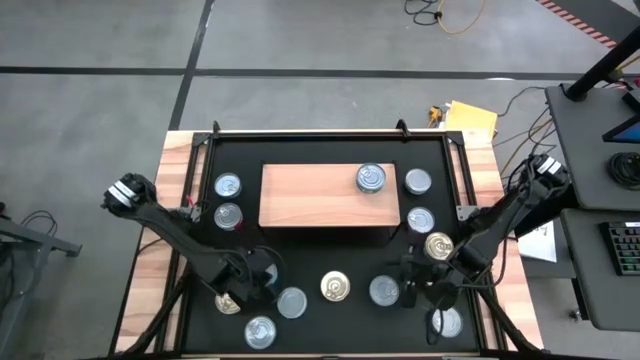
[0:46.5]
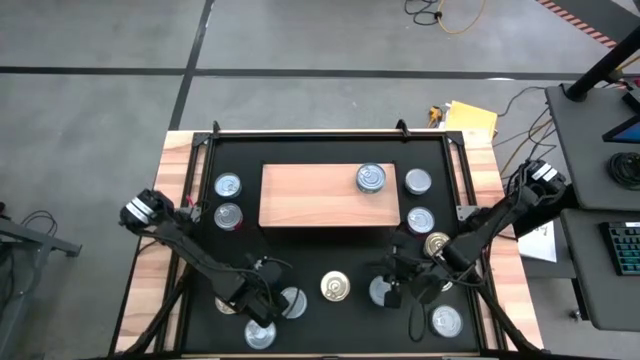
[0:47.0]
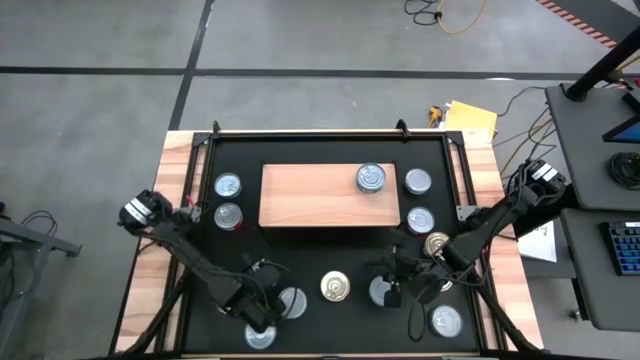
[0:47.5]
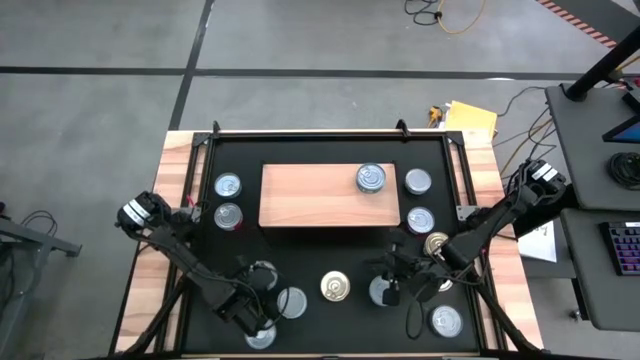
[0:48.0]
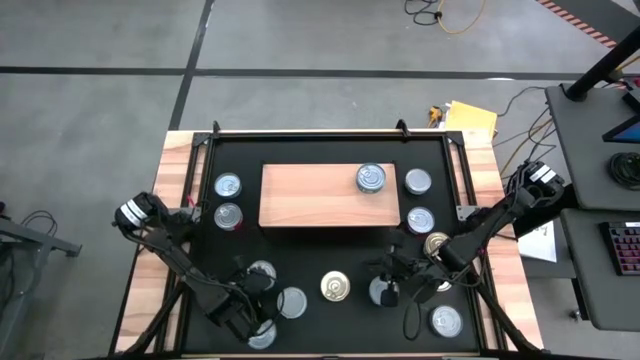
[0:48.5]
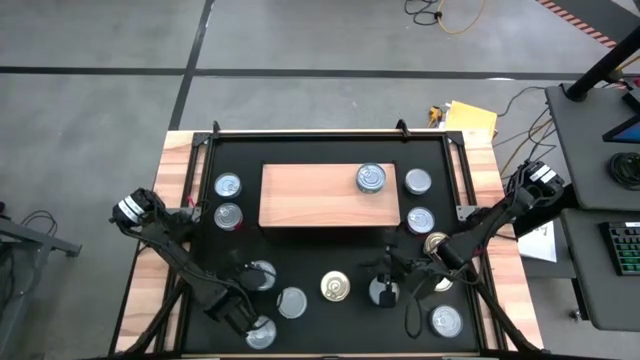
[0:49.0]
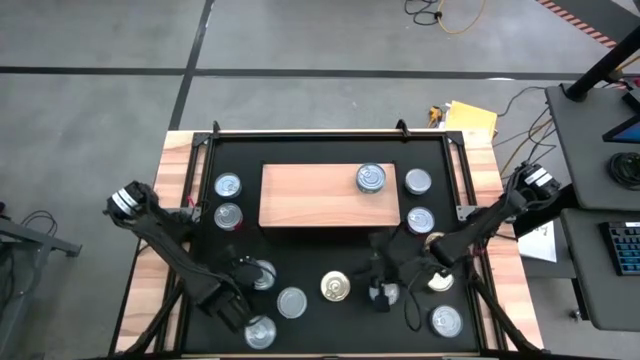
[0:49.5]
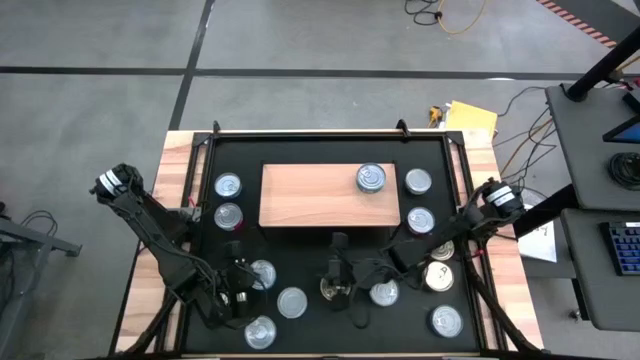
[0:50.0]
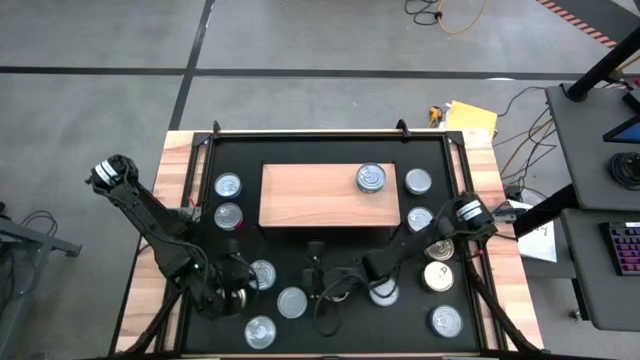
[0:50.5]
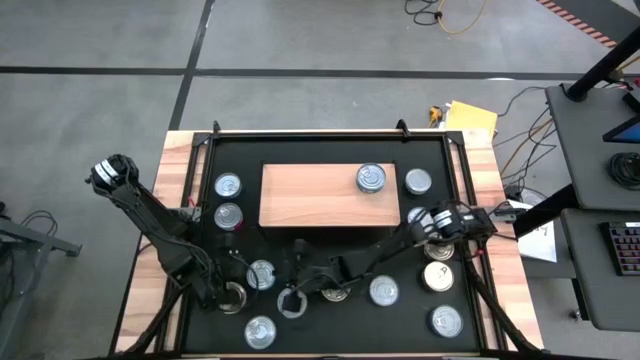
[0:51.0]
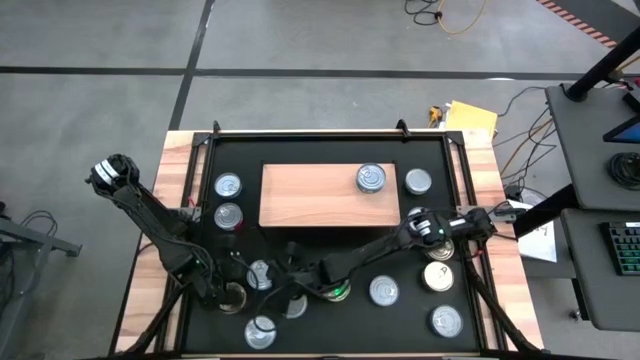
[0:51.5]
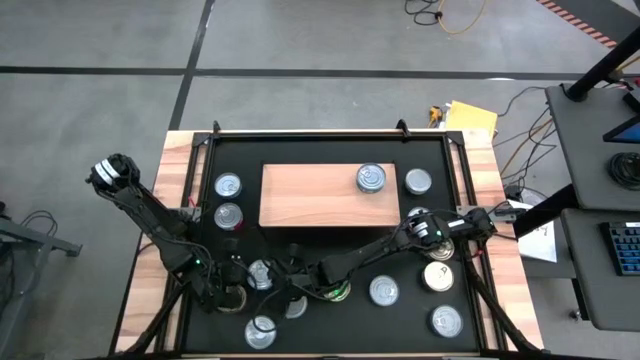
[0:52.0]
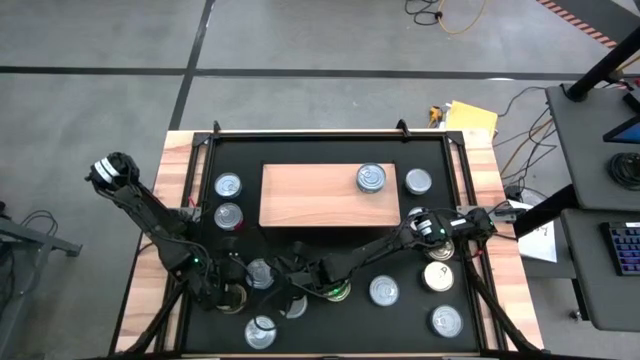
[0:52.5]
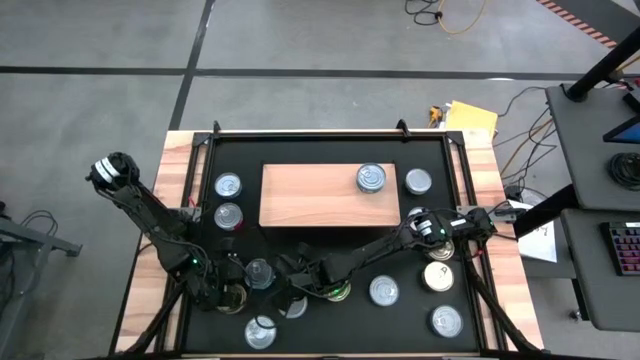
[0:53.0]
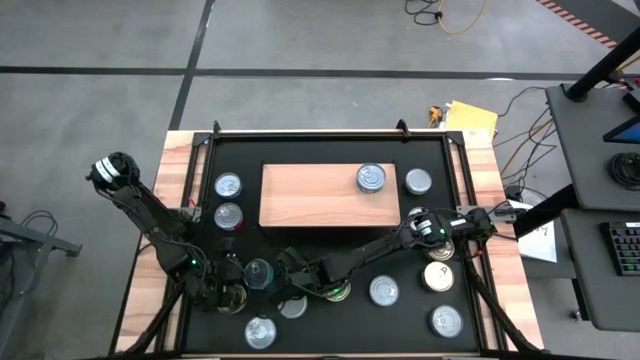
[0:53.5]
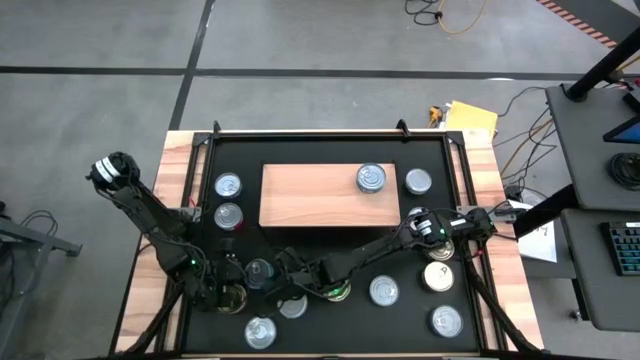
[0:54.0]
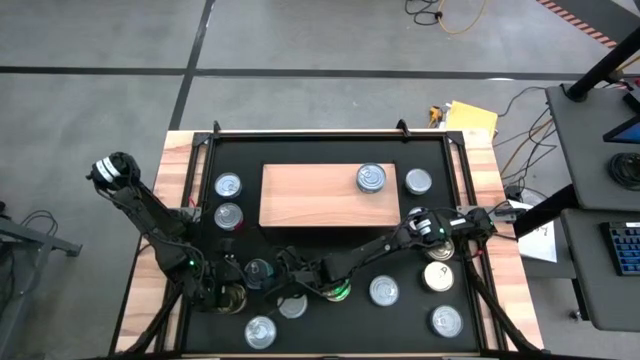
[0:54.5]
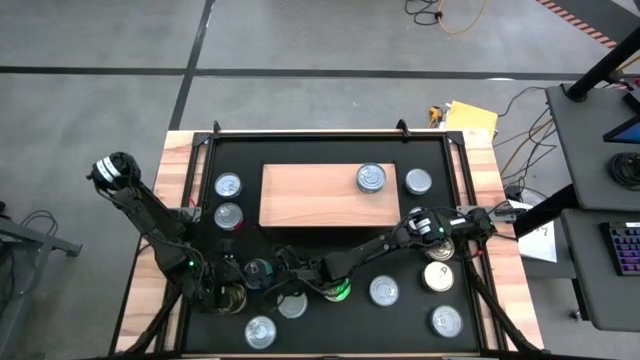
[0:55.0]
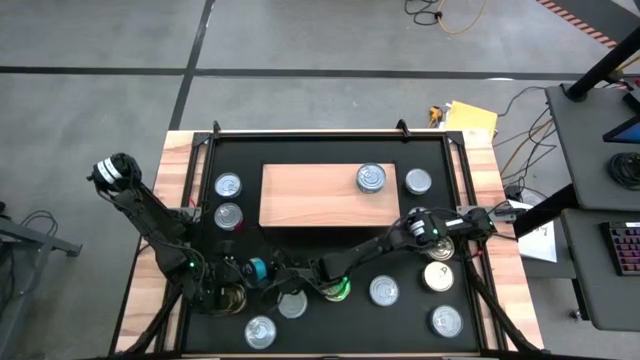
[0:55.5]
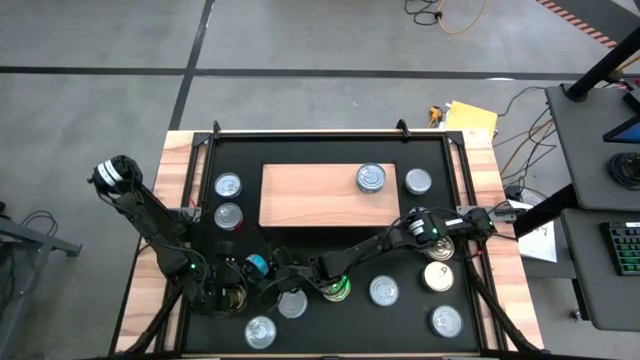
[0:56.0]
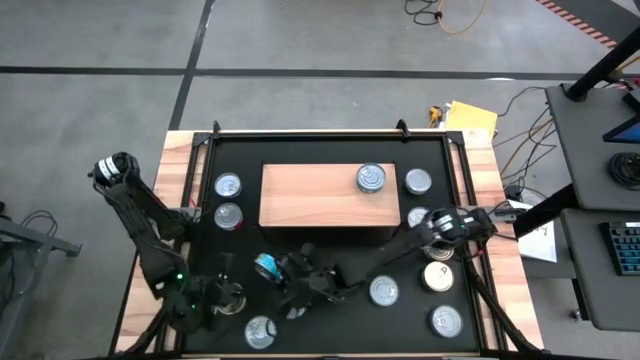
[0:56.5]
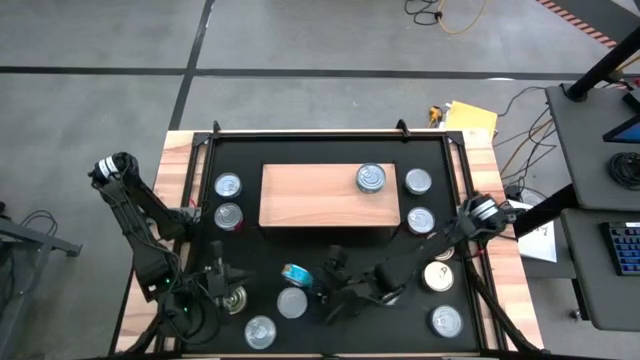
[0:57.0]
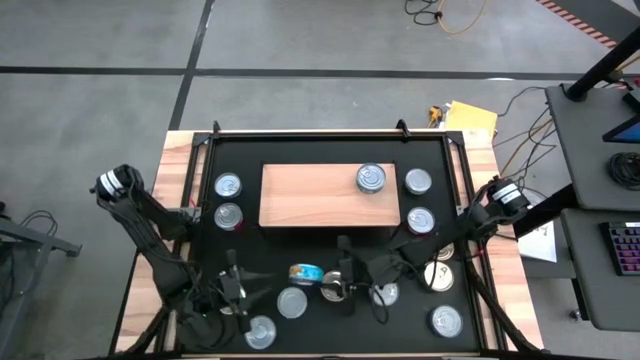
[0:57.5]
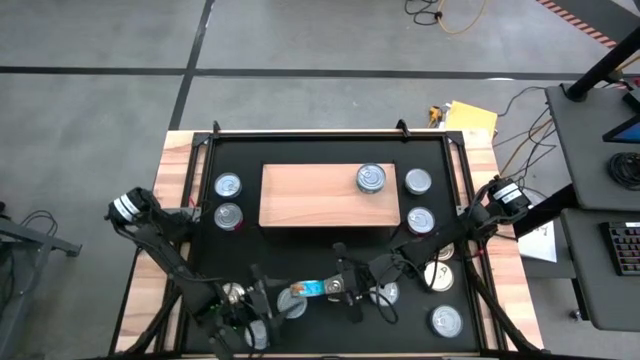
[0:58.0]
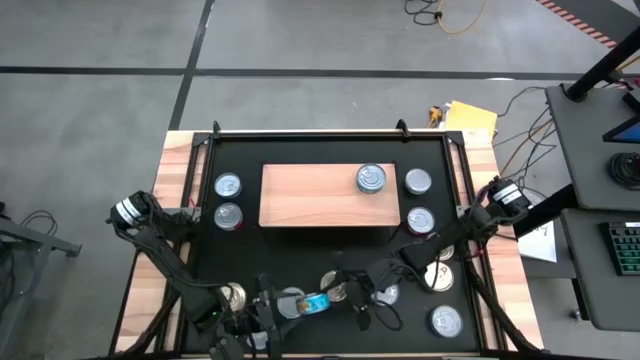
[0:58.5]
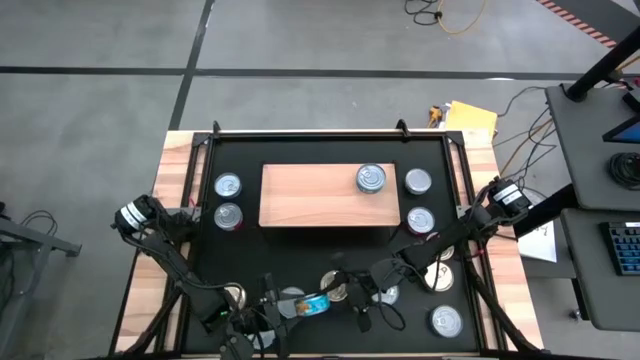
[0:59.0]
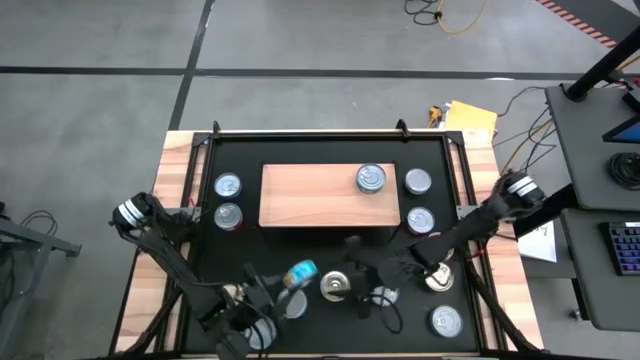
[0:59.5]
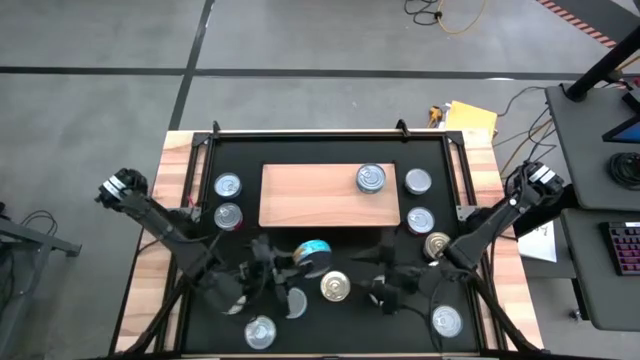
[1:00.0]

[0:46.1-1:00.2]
Task: Stack canned seafood by type on shelf
Put the light blue tuna can on the shelf

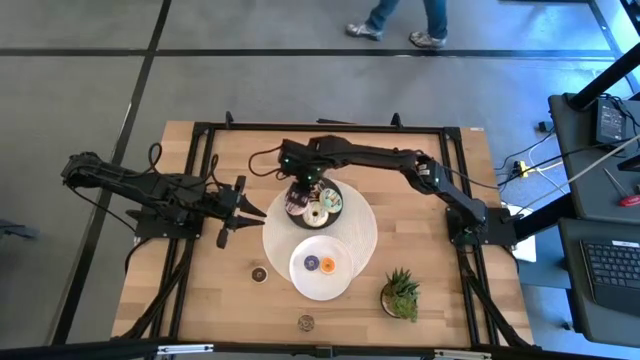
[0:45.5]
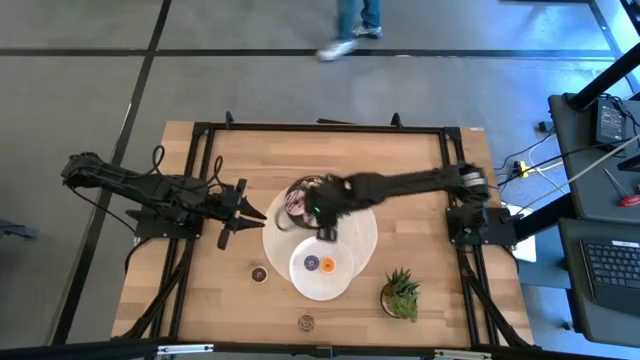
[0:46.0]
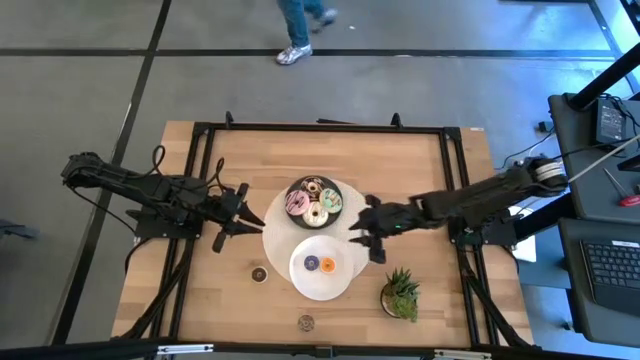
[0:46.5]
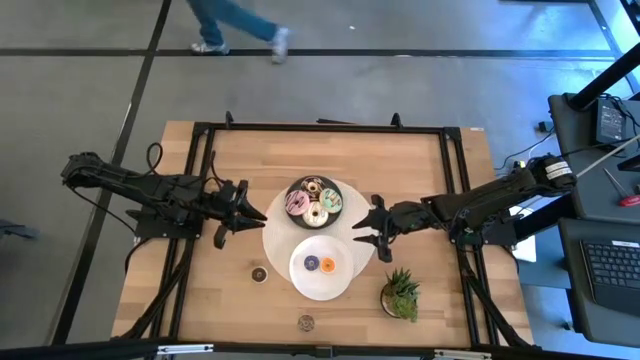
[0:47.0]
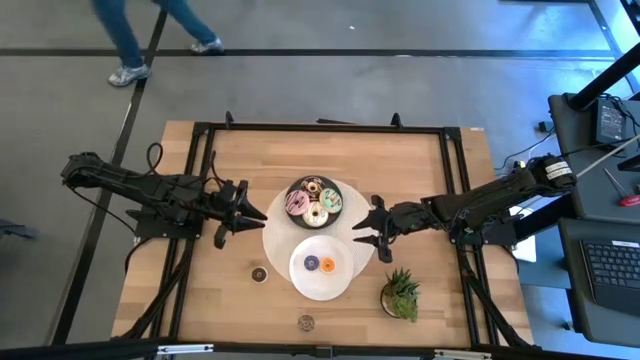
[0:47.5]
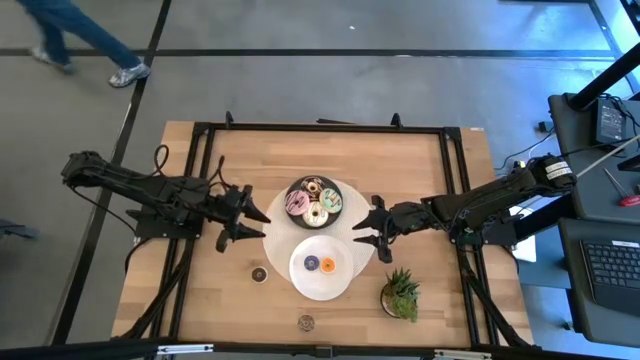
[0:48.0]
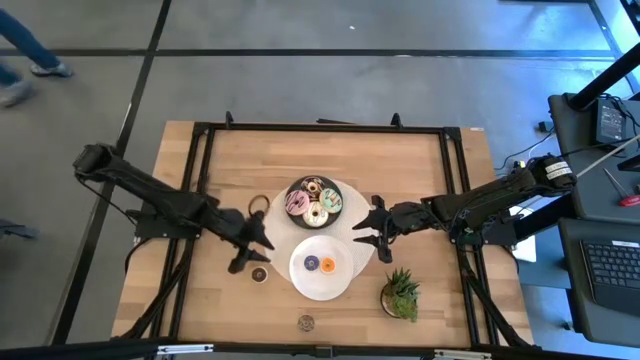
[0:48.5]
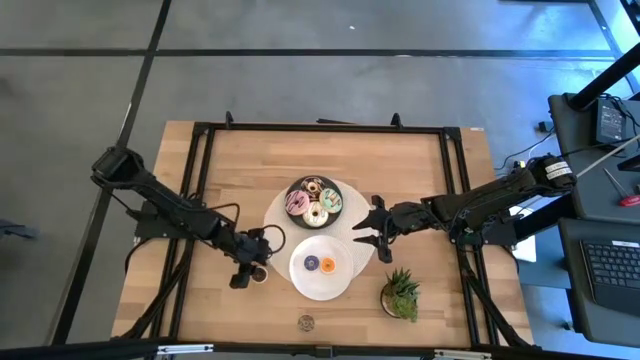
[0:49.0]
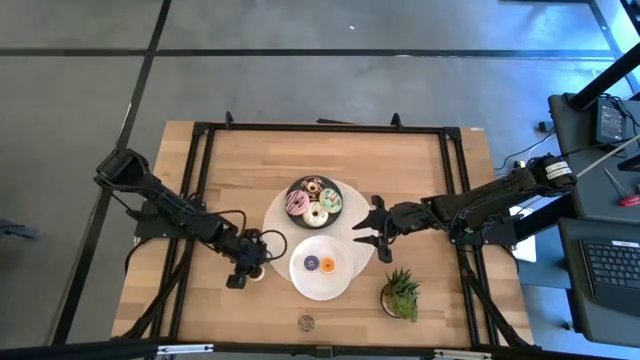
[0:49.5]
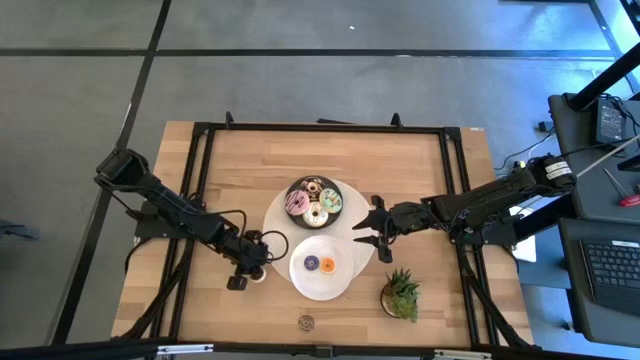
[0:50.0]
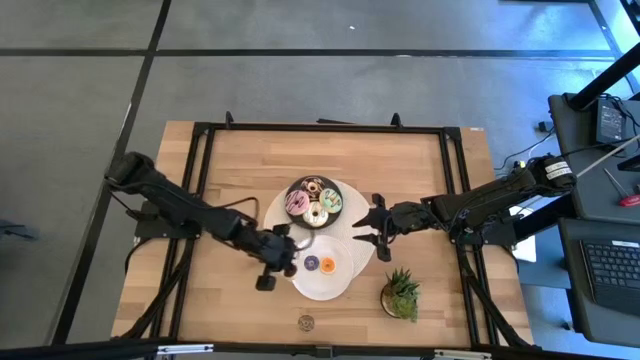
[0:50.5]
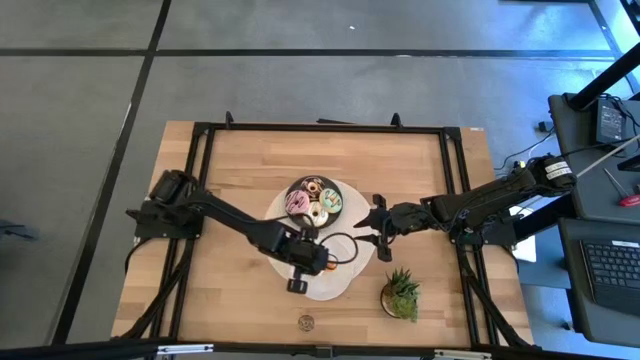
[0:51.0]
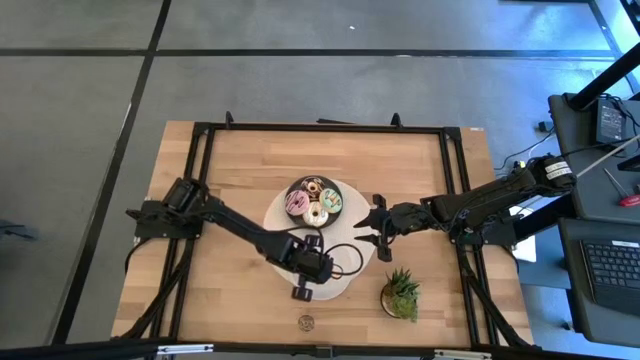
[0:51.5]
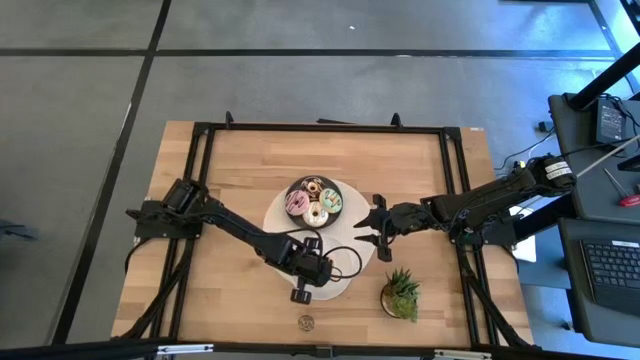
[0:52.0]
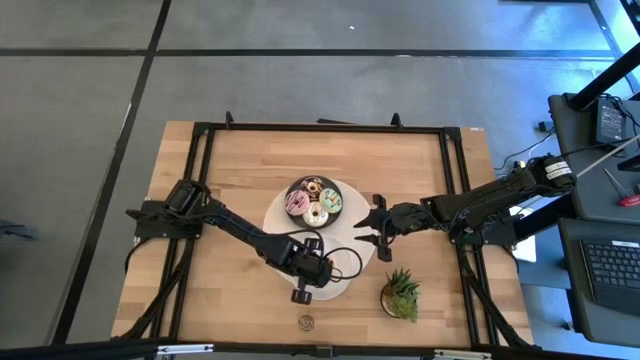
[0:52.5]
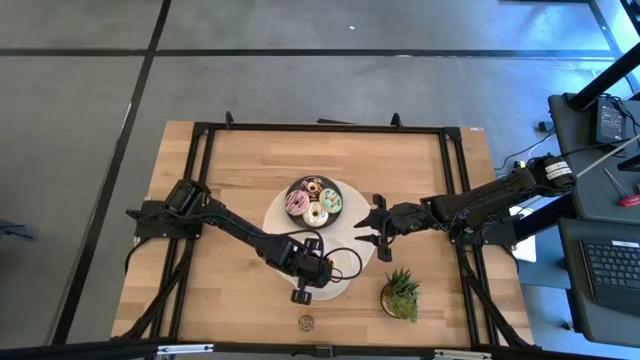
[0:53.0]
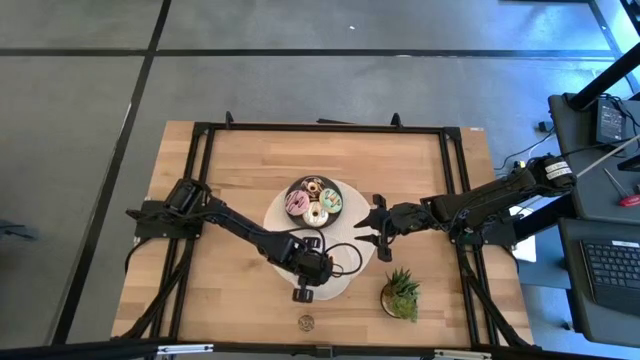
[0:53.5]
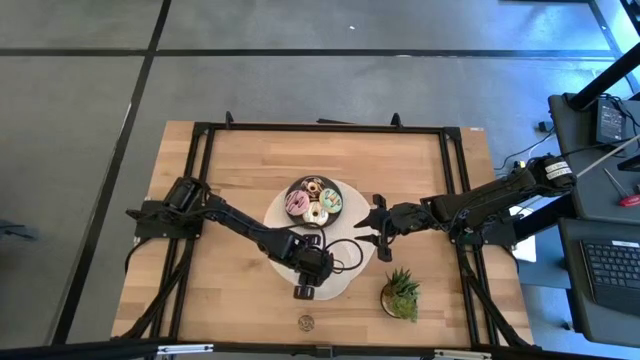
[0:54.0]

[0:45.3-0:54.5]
Task: Pick & Place donuts
Put the small dark brown donut on the white plate
